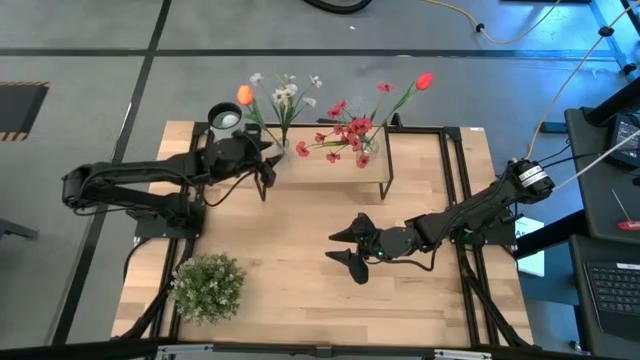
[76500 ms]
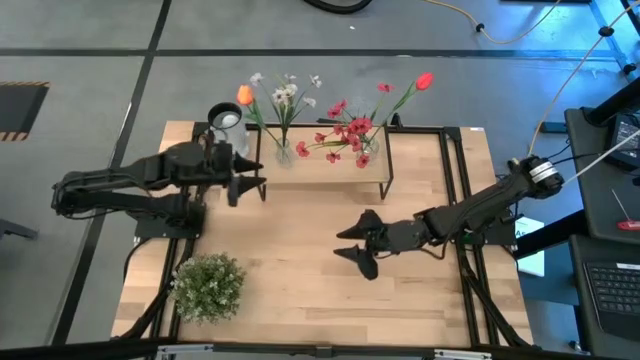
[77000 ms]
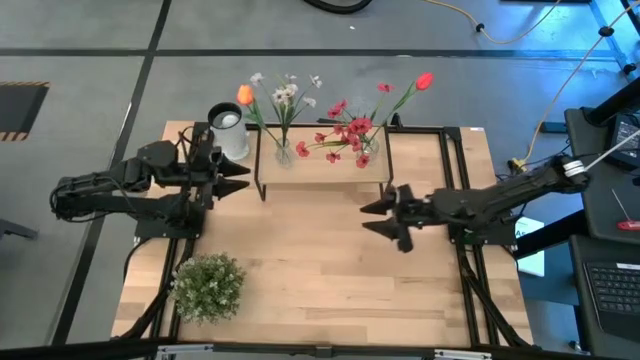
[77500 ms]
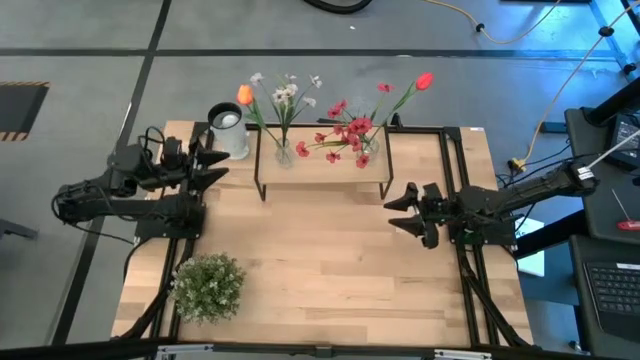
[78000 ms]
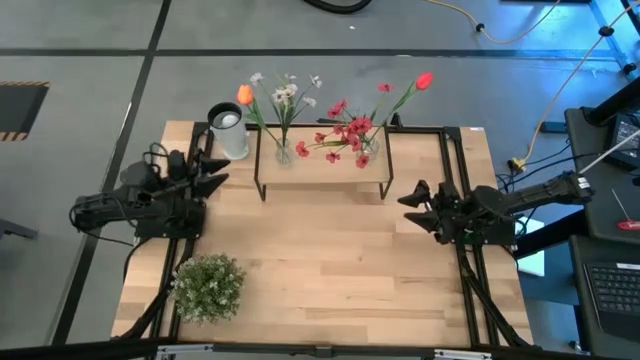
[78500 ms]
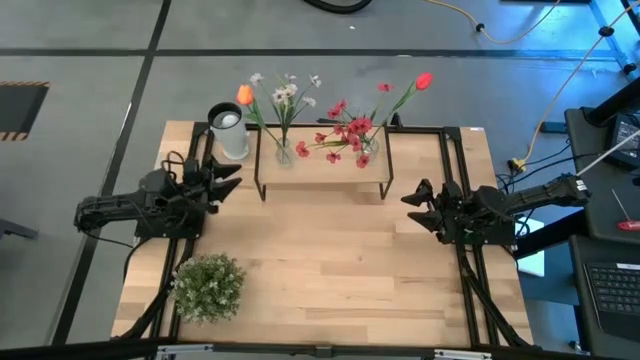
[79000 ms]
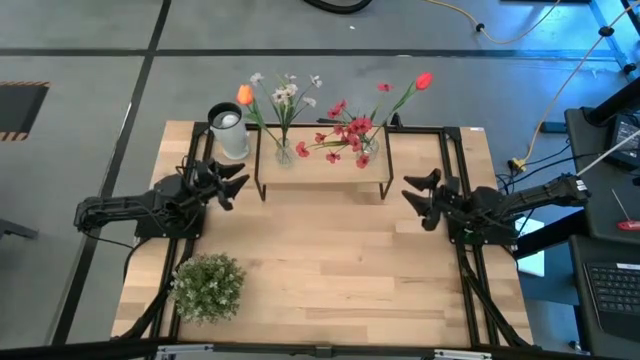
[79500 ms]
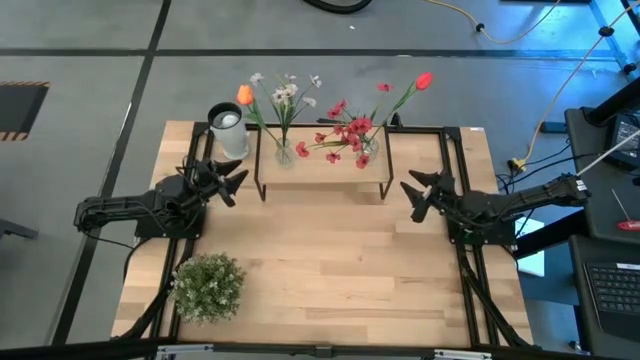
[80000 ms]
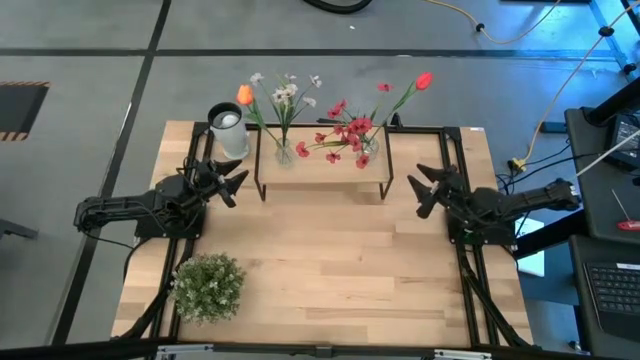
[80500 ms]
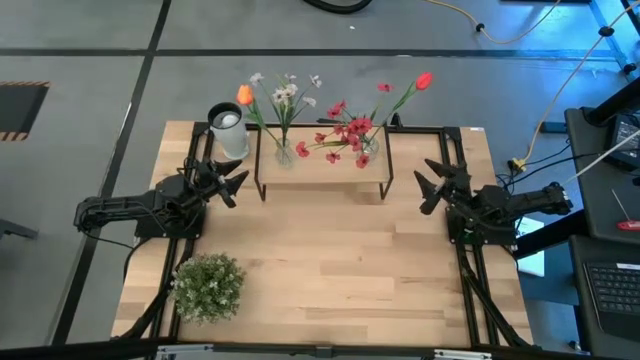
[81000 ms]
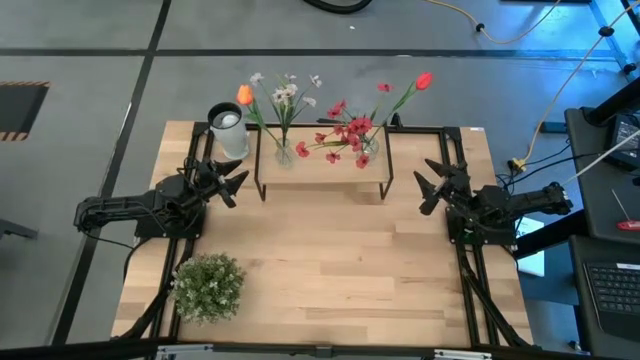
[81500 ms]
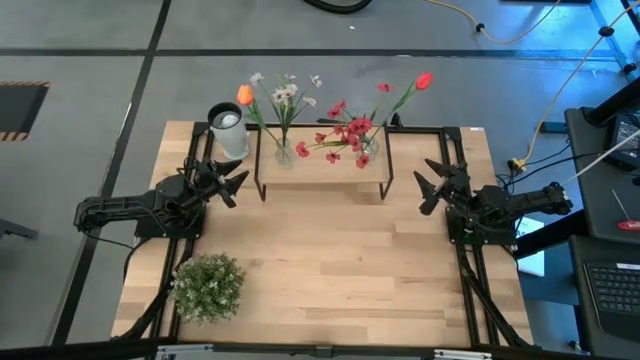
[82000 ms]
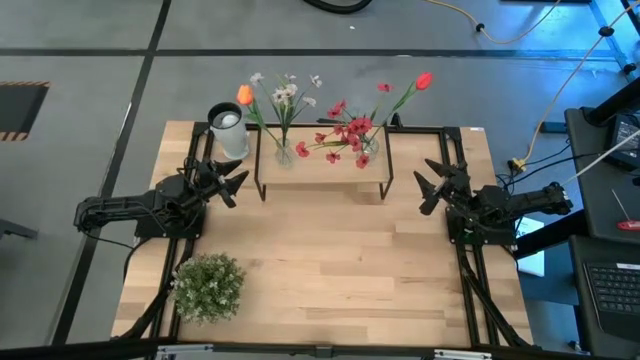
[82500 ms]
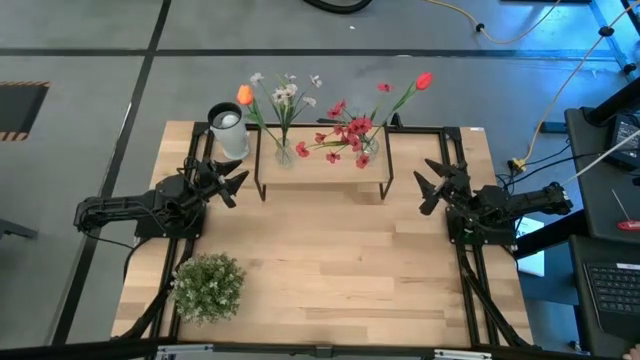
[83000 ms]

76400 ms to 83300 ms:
Task: Pick and place flowers into a vace then onto a shelf
Return to Home Position

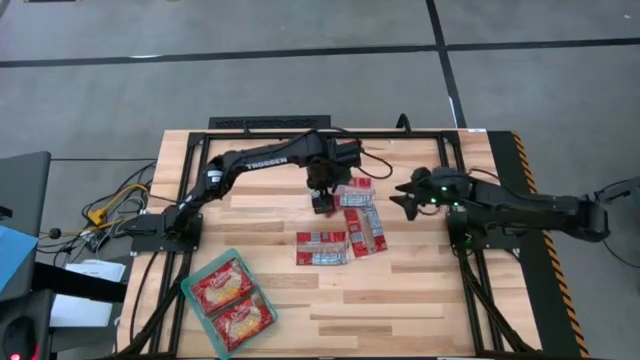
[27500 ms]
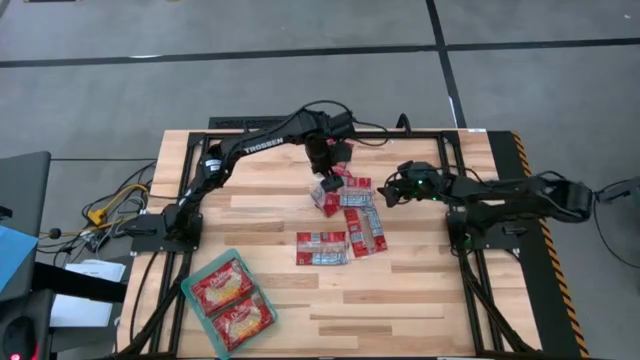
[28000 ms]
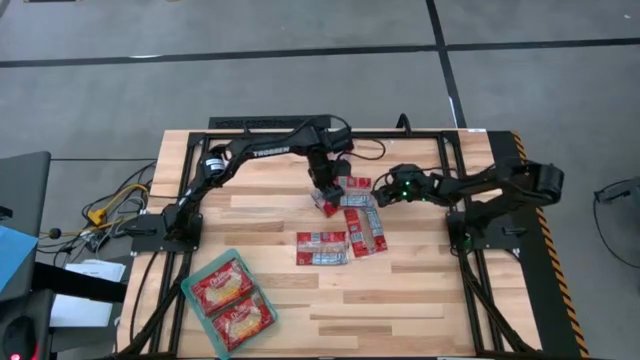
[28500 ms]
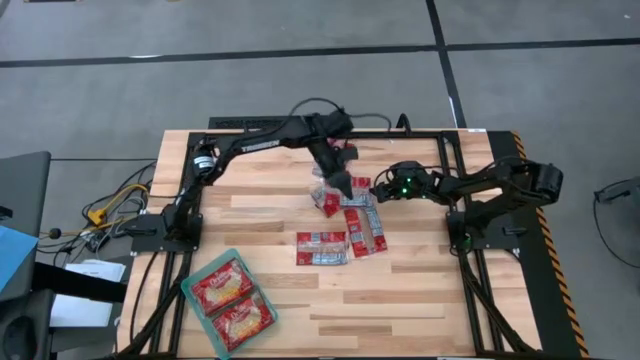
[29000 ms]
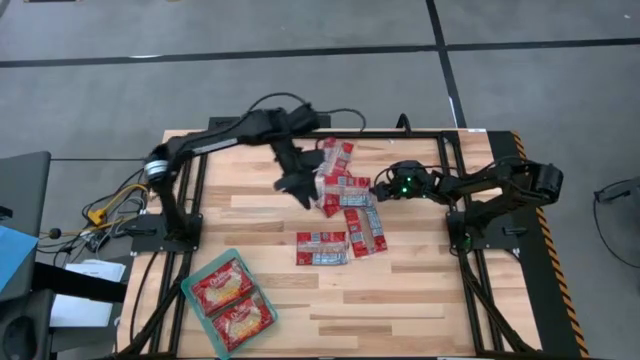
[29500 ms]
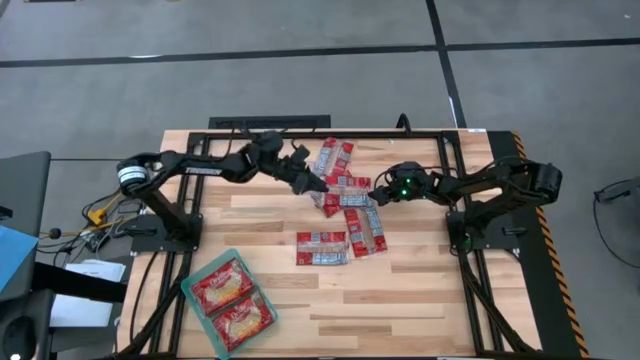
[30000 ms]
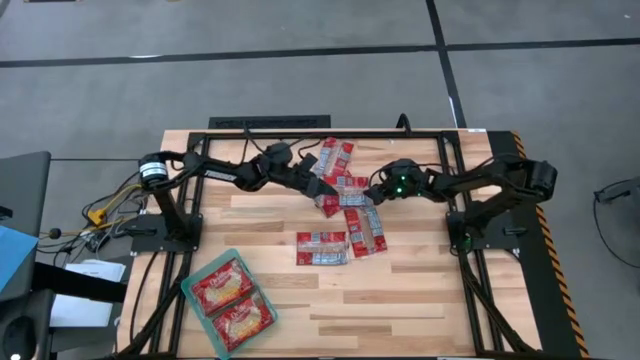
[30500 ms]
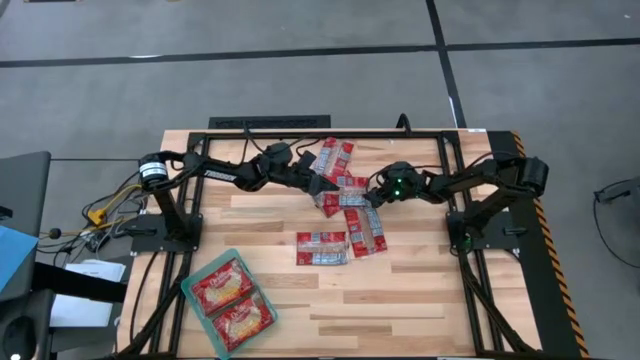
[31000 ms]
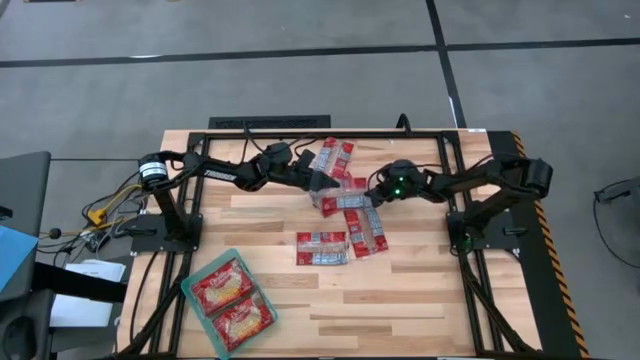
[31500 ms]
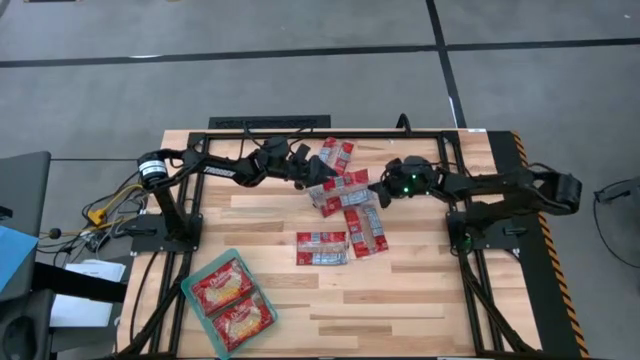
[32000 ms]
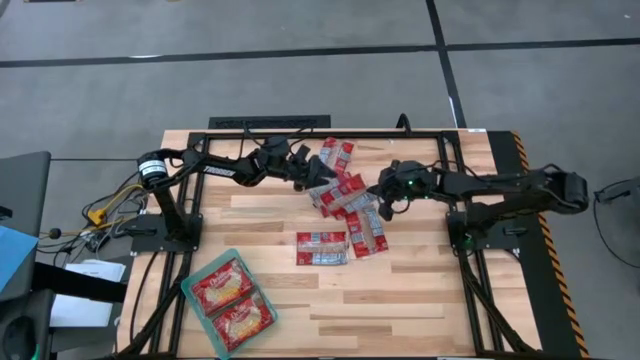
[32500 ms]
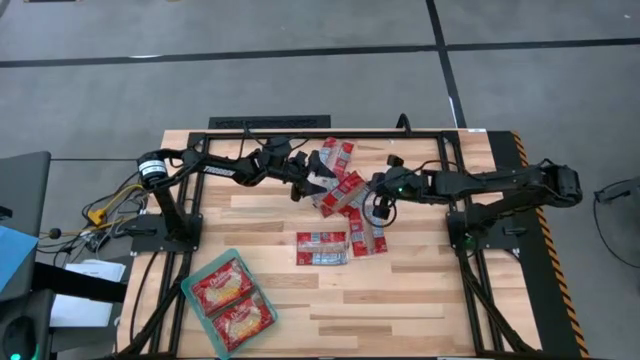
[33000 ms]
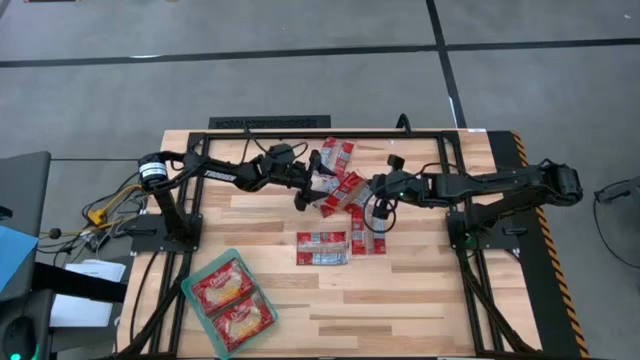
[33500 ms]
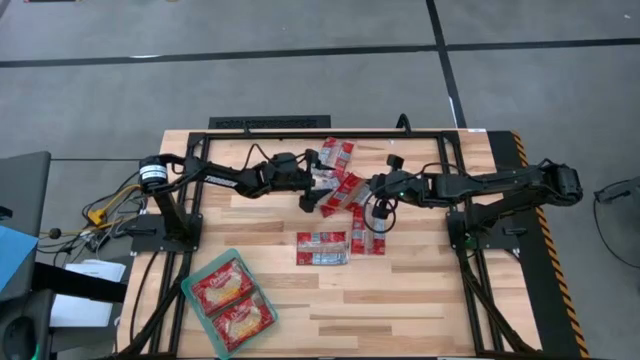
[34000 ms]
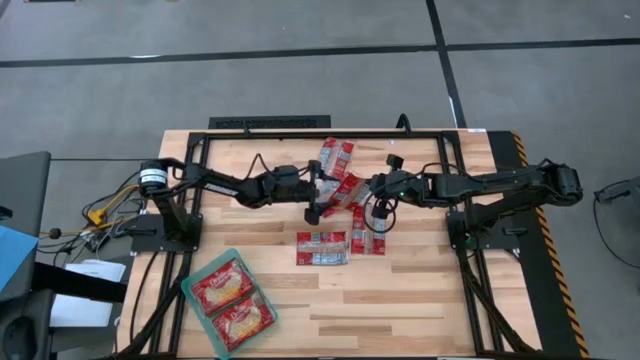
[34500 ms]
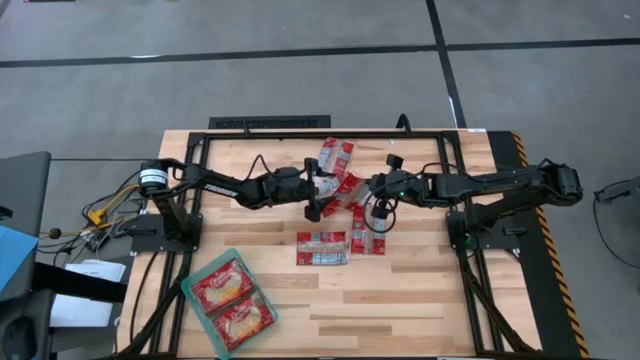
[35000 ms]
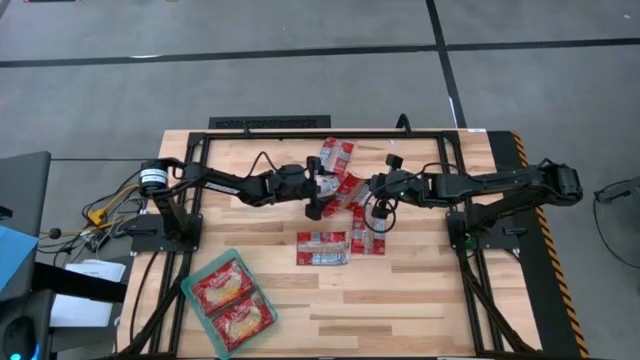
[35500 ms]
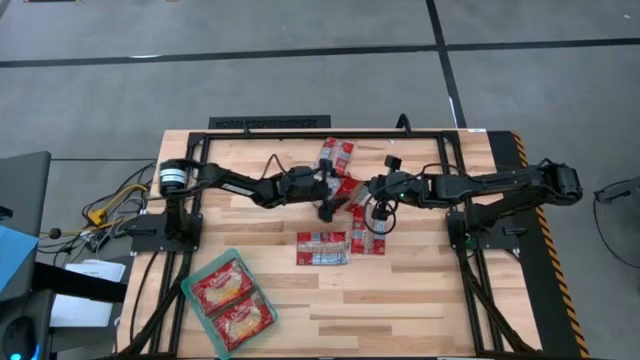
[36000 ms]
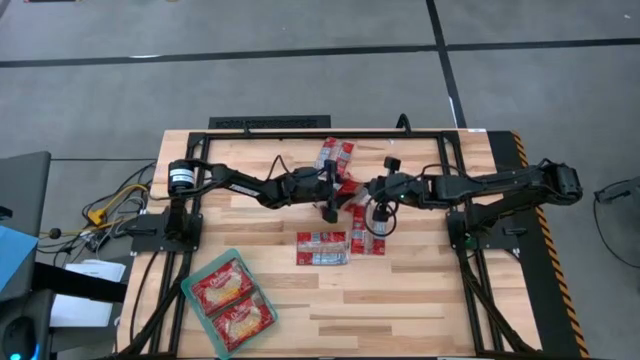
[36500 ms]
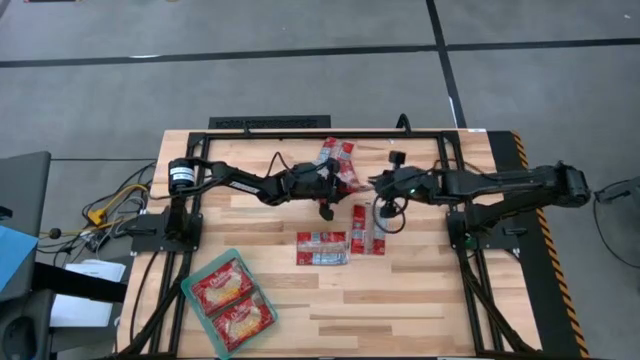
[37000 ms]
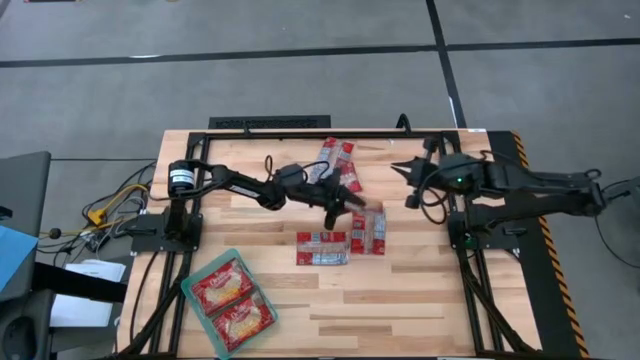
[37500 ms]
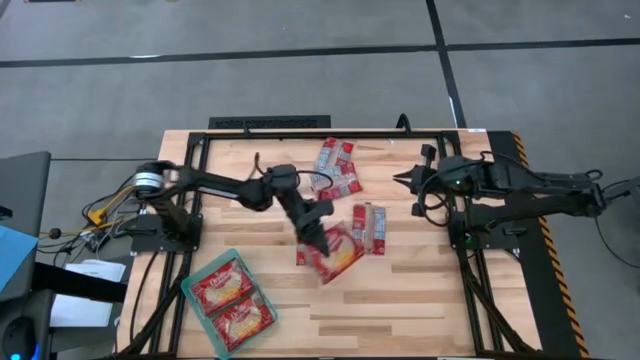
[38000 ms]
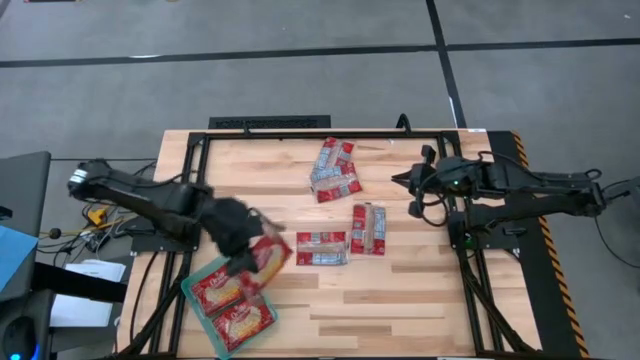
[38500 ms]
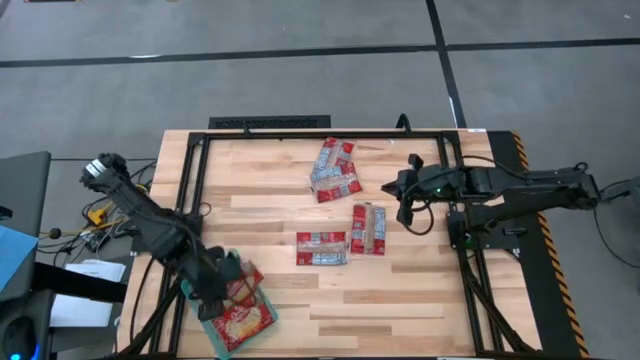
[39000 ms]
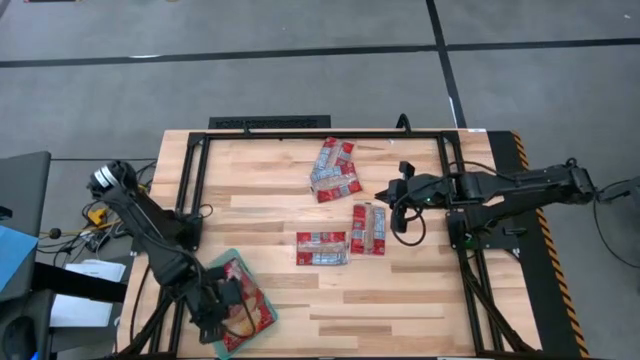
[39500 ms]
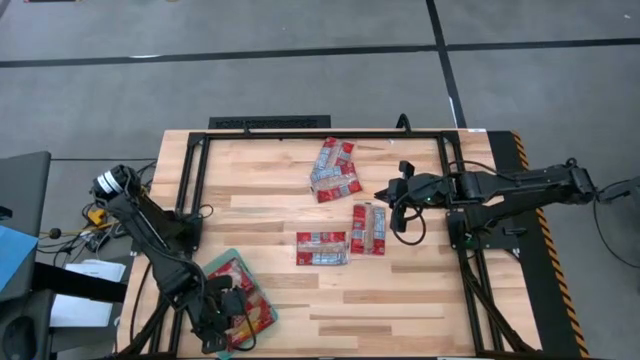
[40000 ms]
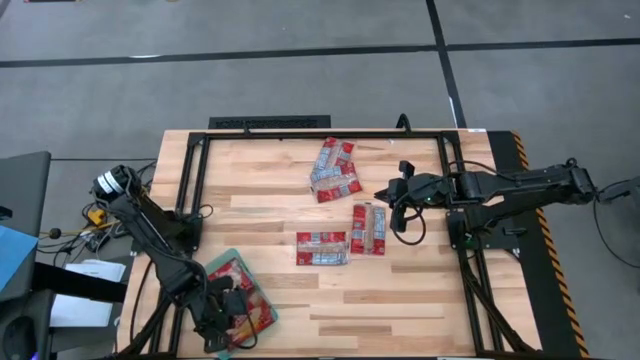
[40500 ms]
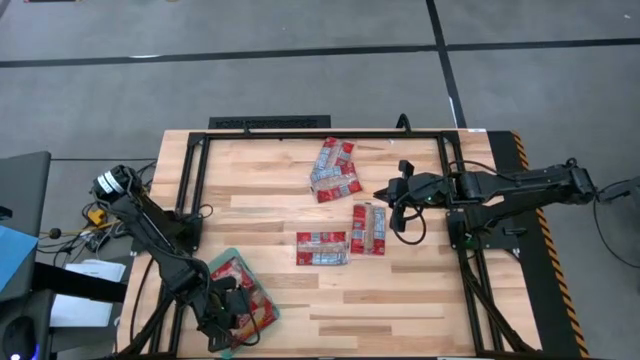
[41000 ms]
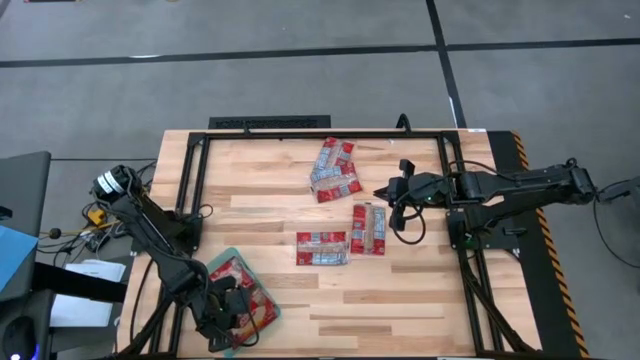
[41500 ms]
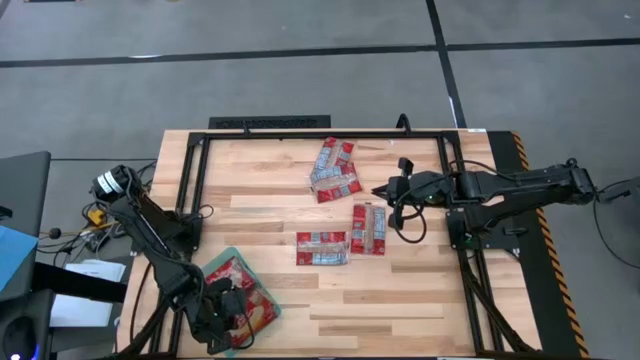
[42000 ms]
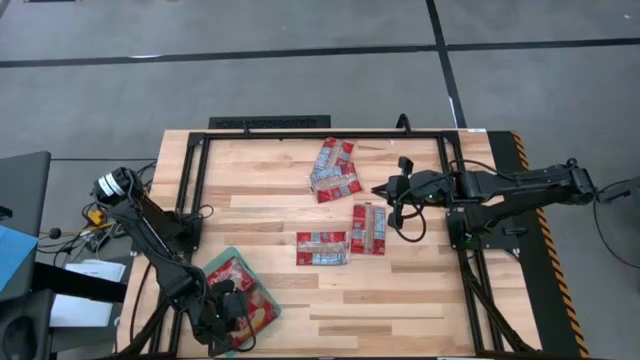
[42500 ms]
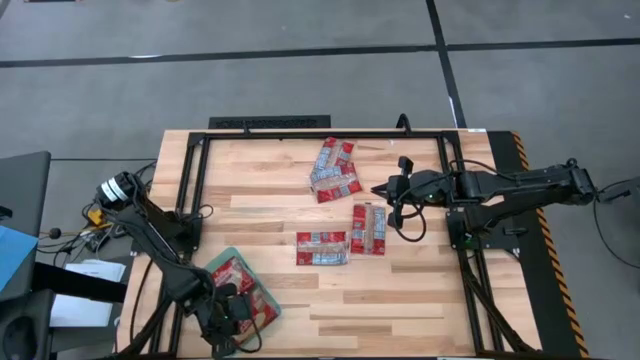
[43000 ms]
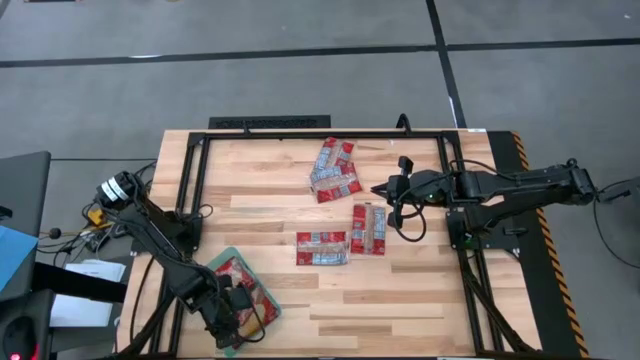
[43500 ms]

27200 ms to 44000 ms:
Task: Sort popcorn bags into baskets
Put the red popcorn bag into the green bin
